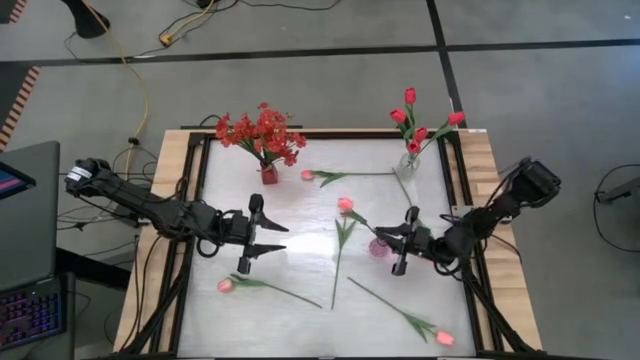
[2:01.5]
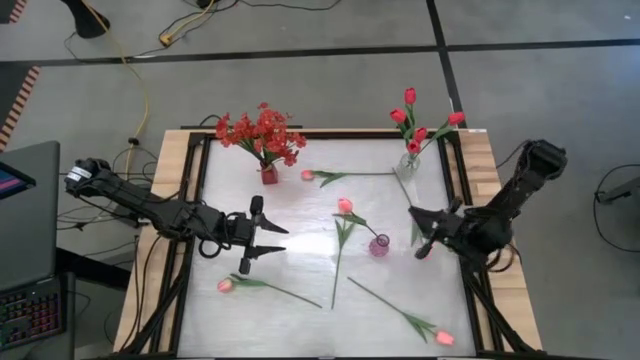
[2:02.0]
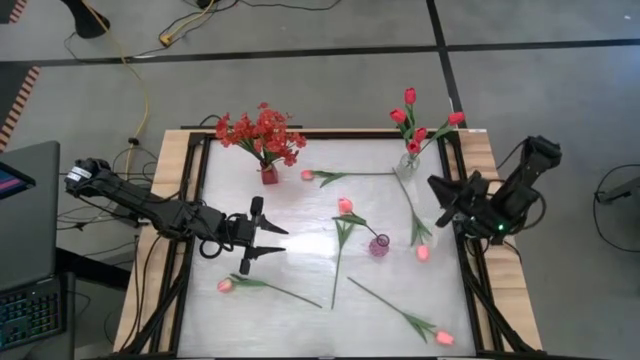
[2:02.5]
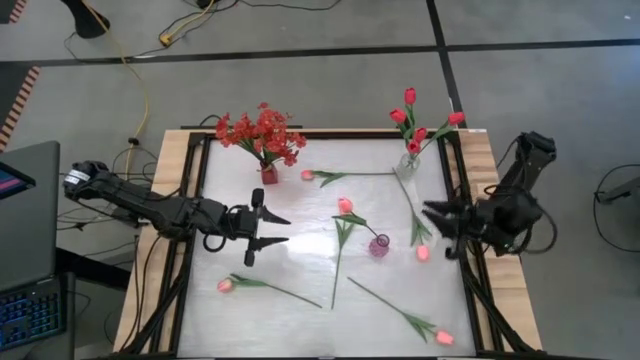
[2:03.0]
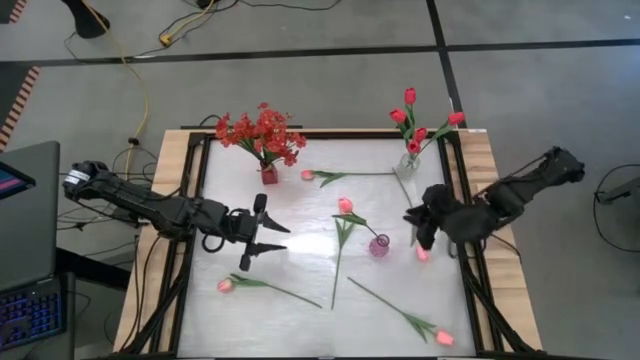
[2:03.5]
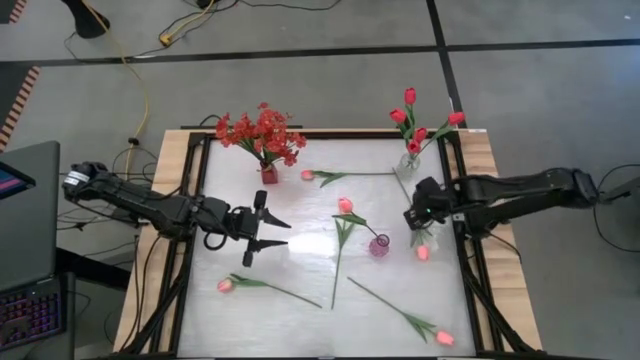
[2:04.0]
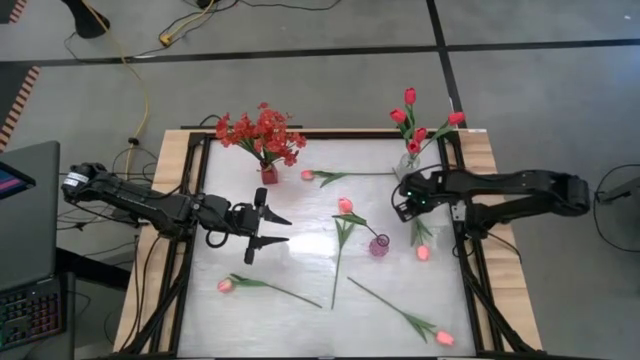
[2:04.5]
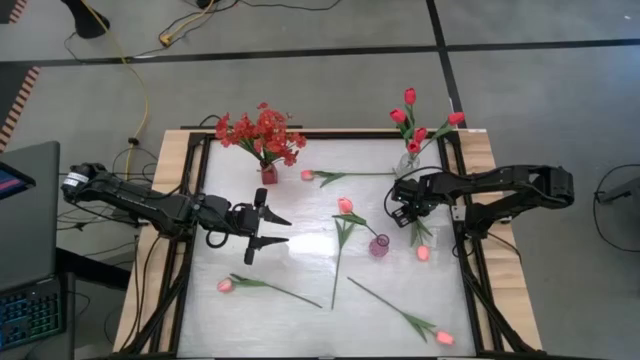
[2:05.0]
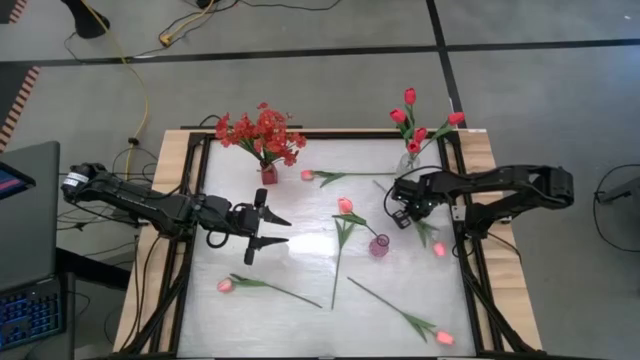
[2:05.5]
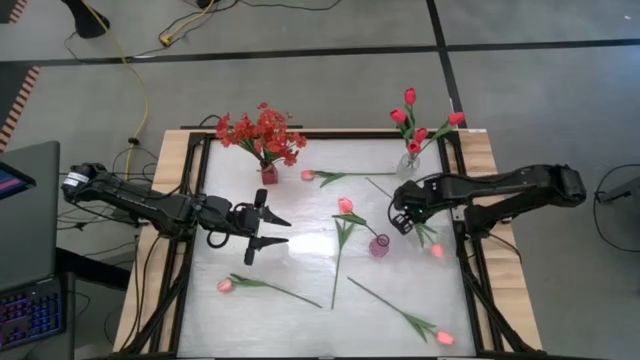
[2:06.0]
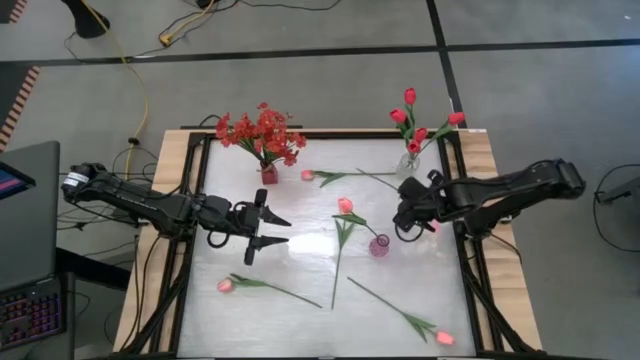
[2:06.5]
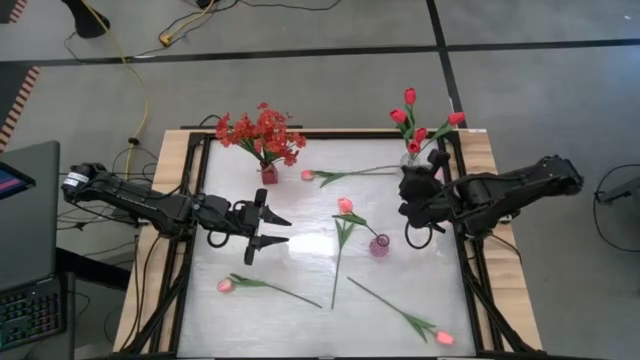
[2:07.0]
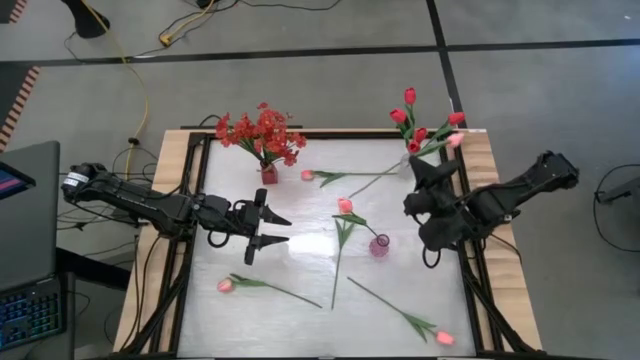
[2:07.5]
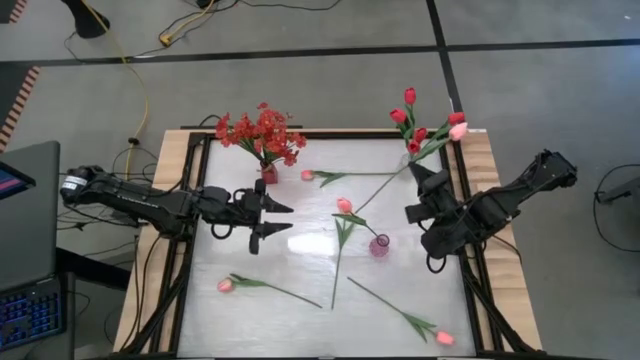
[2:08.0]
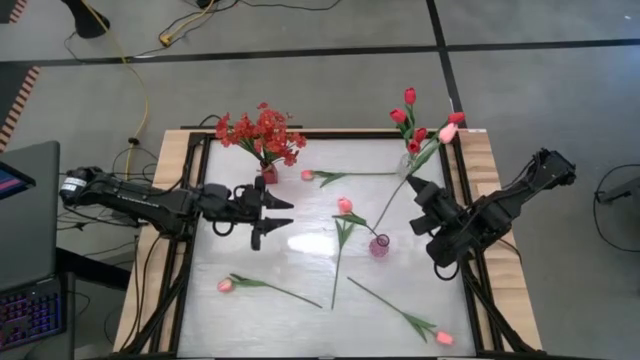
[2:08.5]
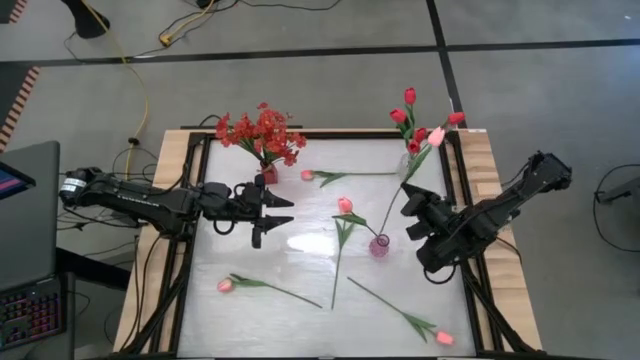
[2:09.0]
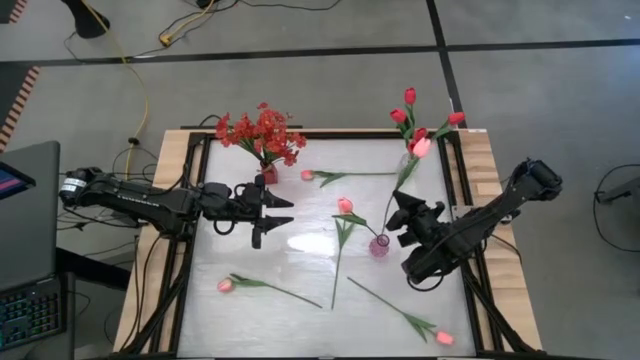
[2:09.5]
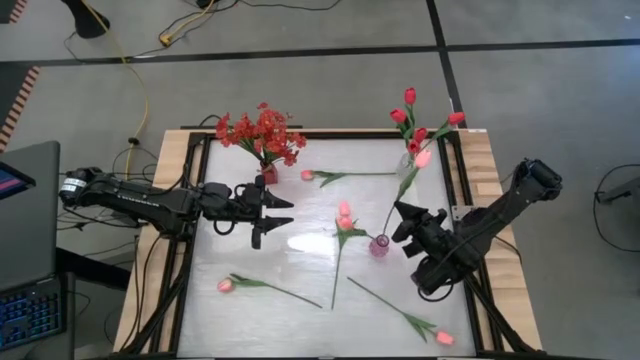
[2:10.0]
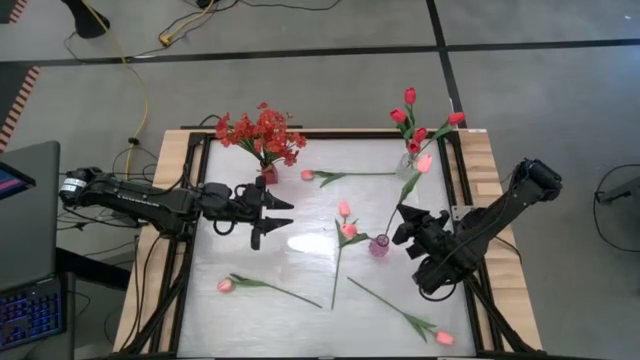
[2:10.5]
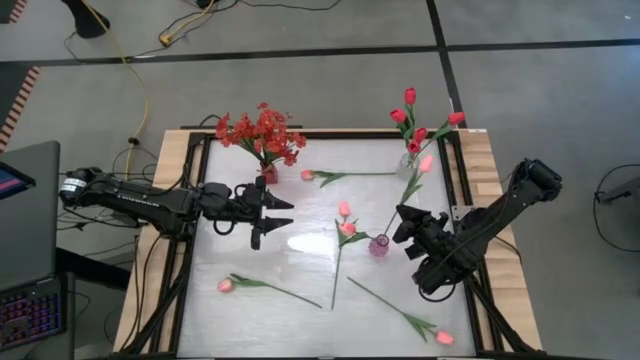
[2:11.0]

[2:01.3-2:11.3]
Task: Sort flowers into vase by color
Put the pink tulip into the purple flower vase

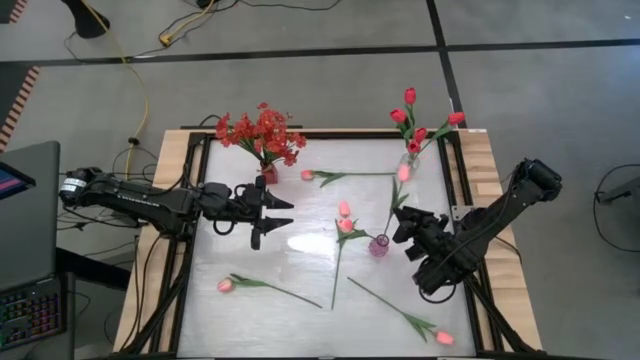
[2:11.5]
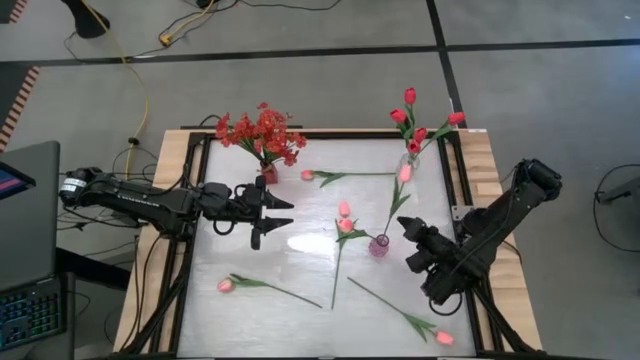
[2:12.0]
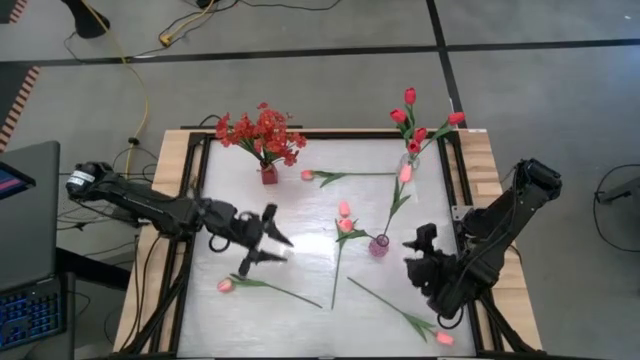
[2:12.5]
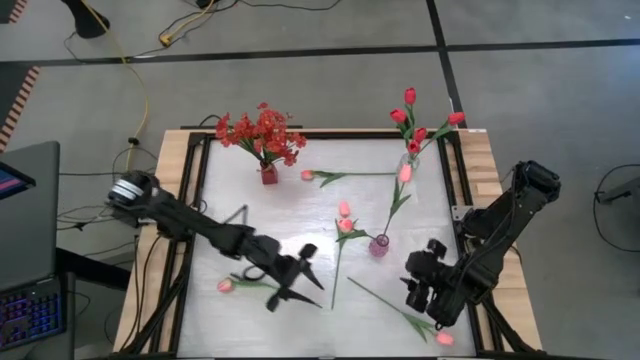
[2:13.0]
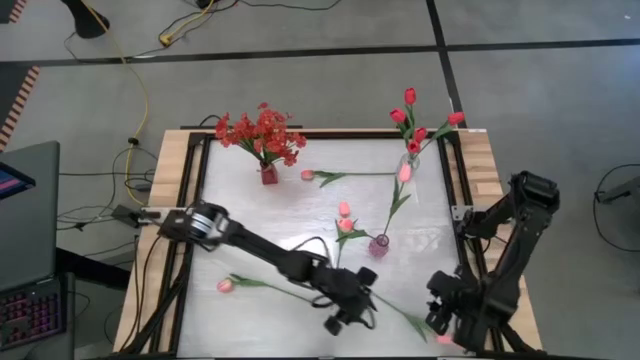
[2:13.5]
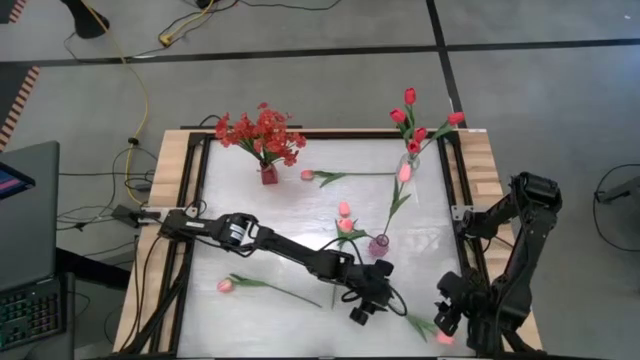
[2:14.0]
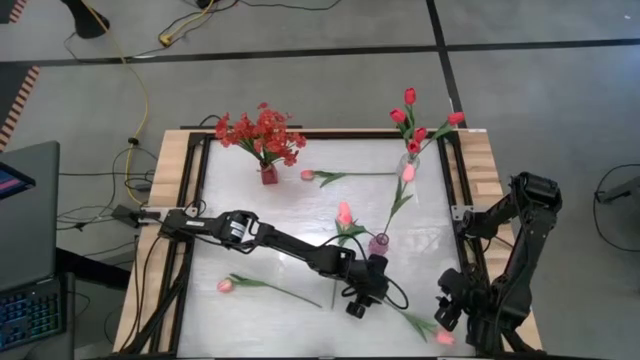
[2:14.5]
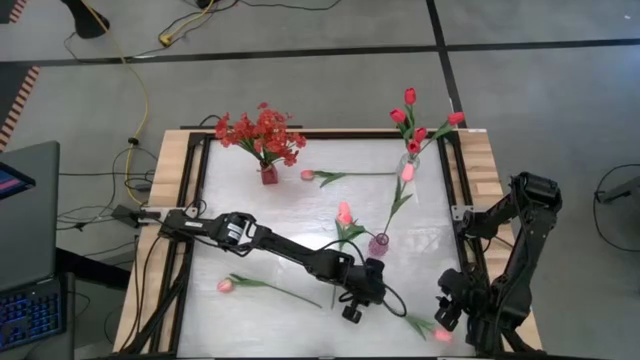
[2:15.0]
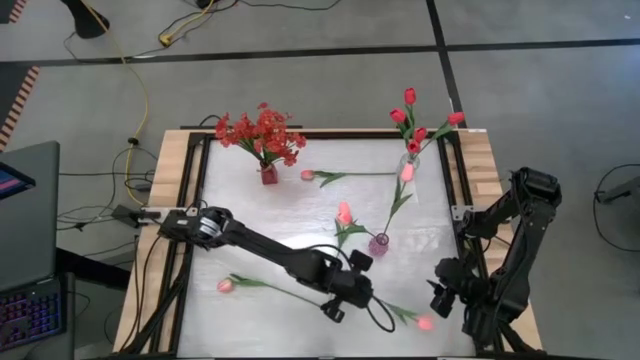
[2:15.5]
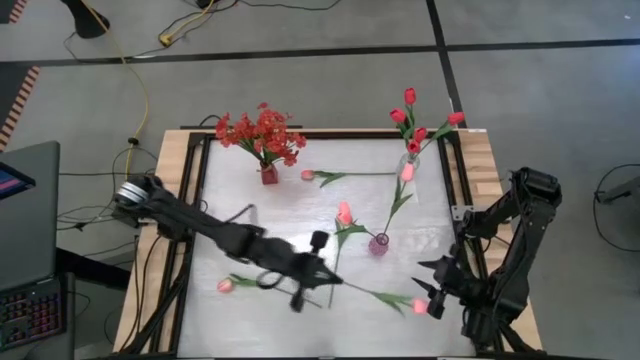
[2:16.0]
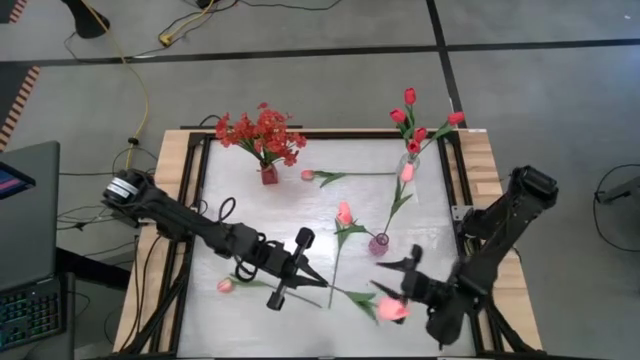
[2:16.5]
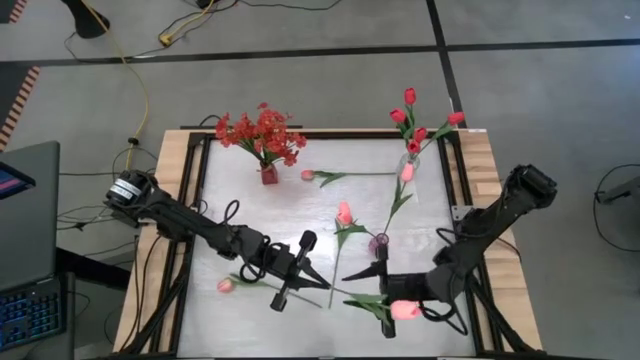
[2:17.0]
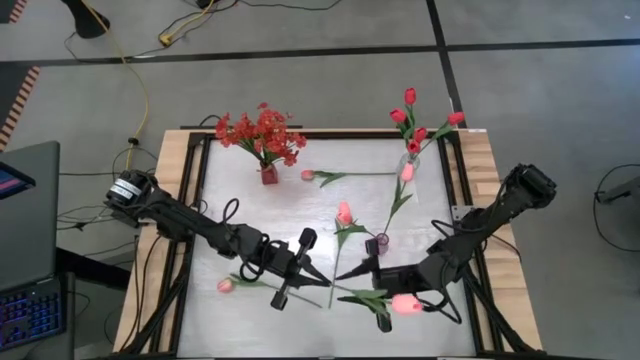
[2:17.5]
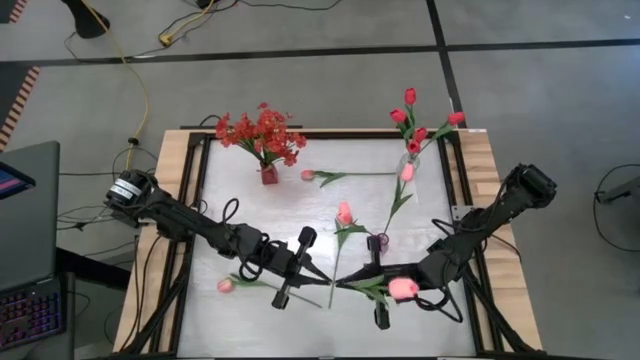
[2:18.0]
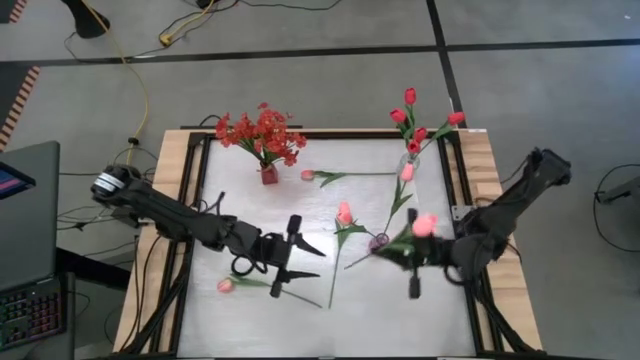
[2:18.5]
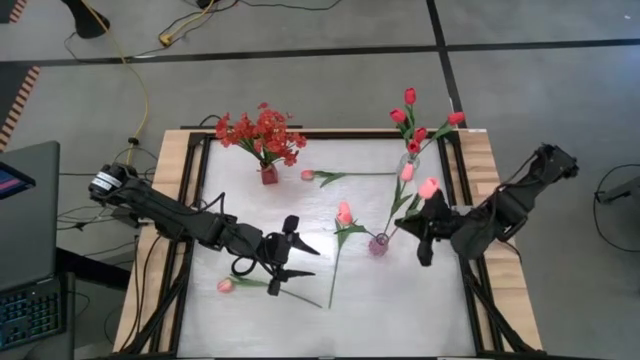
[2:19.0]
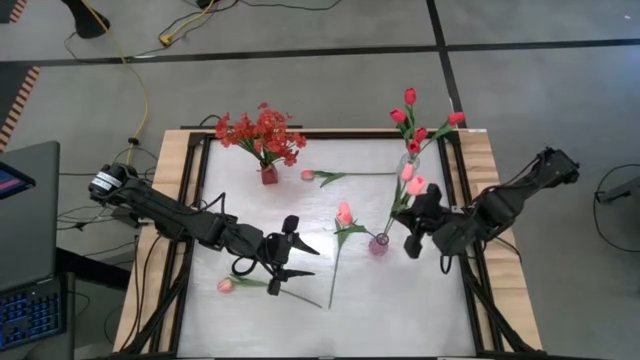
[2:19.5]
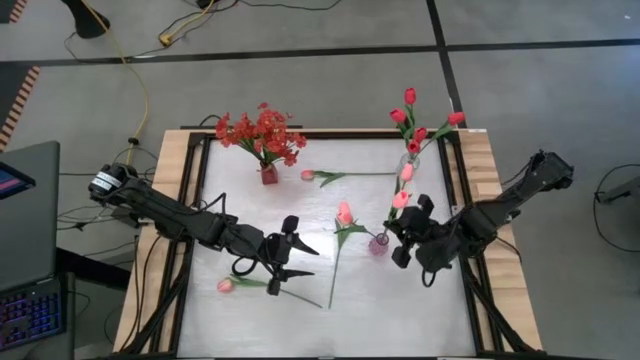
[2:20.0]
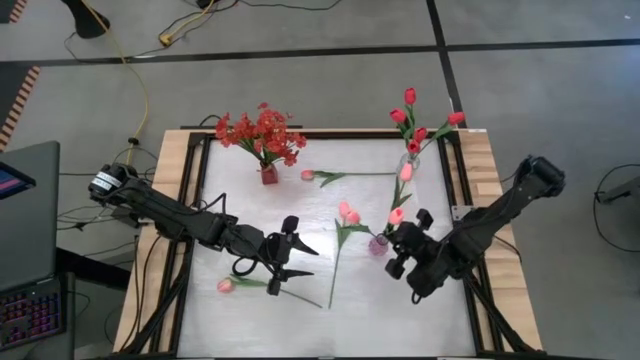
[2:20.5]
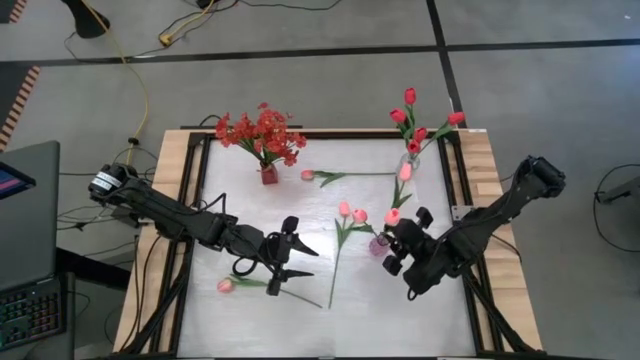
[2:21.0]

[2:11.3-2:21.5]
Put the pink tulip into the purple flower vase

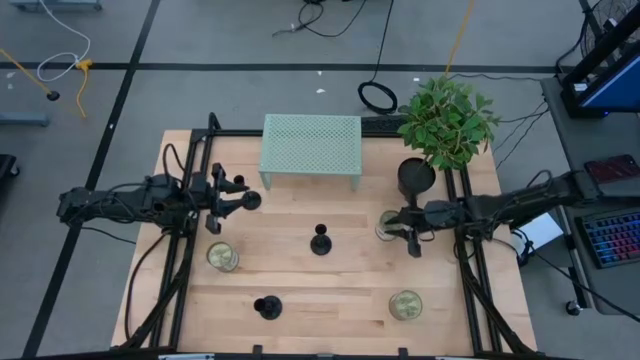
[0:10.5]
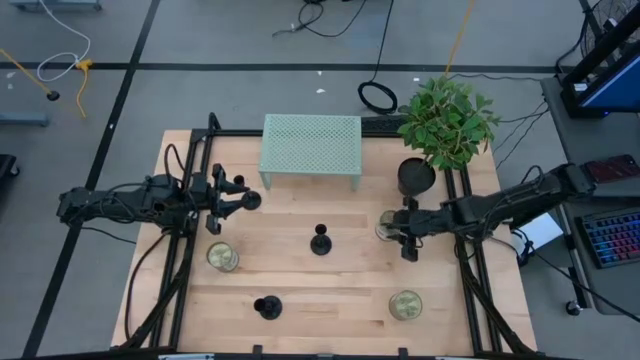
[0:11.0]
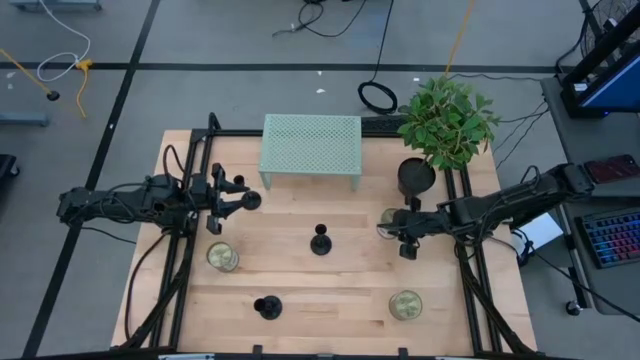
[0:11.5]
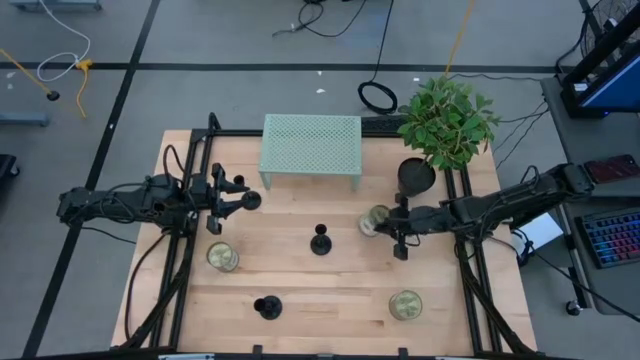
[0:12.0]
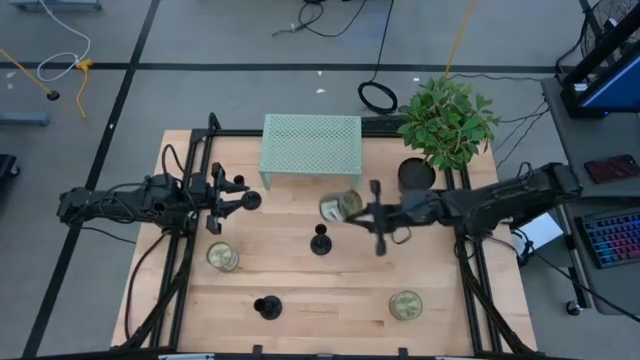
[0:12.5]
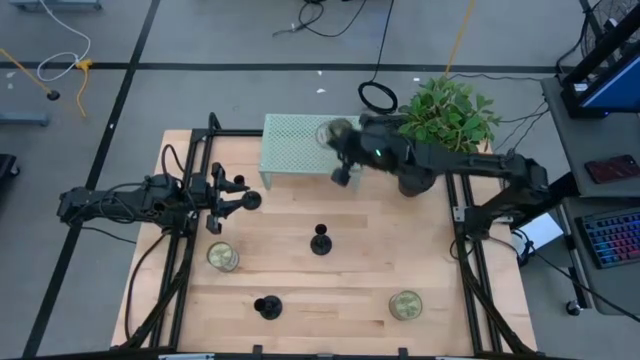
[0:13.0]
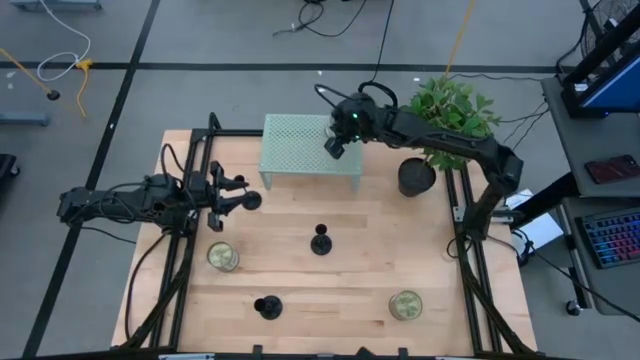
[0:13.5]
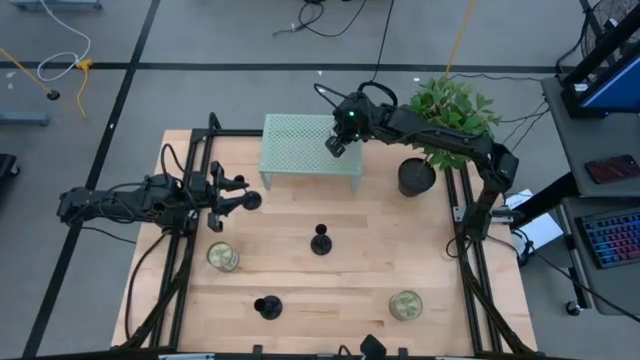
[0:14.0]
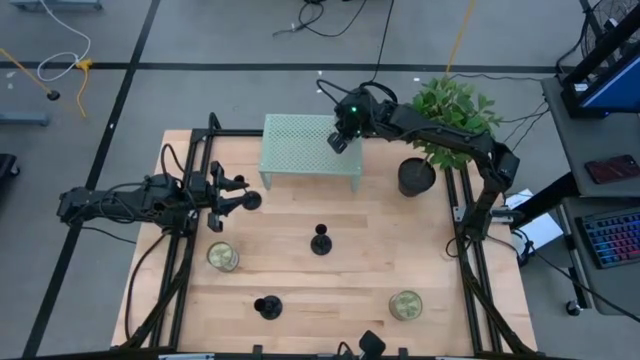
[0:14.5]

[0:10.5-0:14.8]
Task: Pick & Place candle stick holders
Put the top scented candle on the shelf
